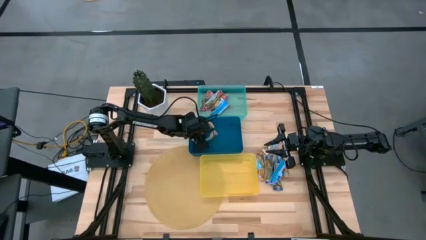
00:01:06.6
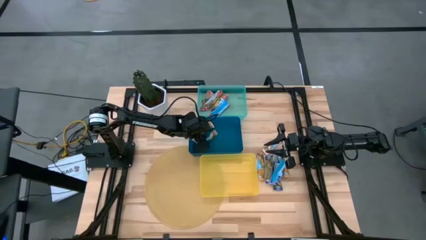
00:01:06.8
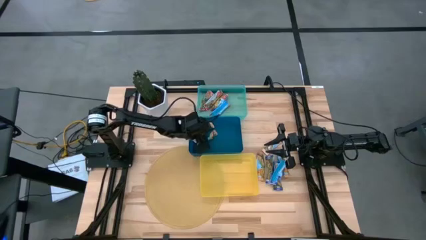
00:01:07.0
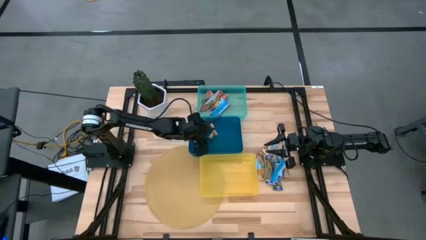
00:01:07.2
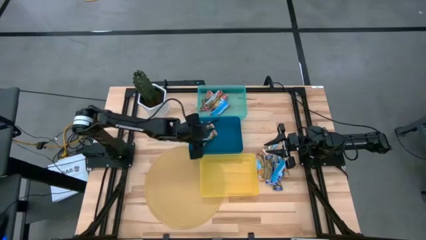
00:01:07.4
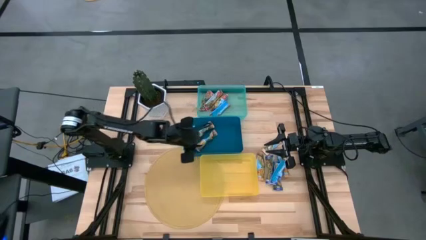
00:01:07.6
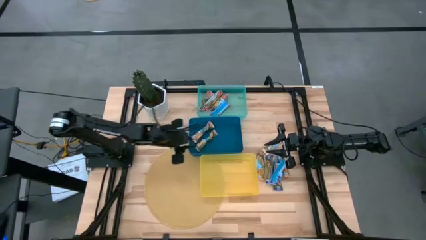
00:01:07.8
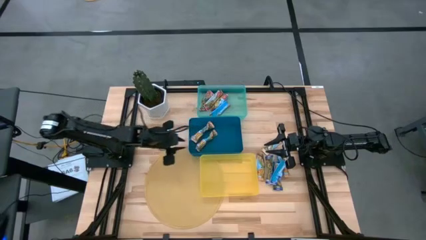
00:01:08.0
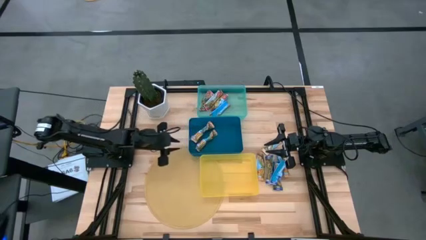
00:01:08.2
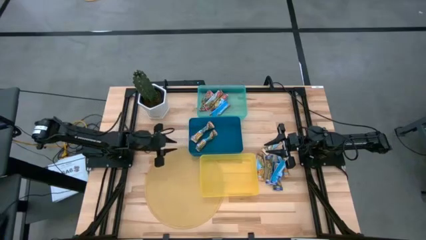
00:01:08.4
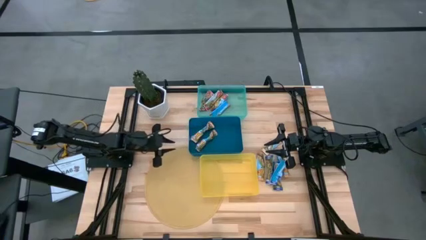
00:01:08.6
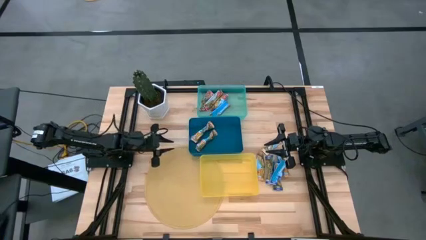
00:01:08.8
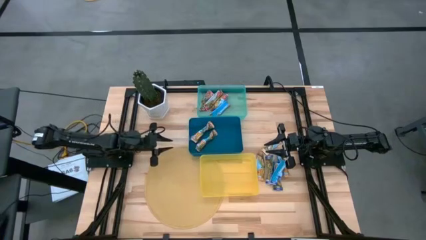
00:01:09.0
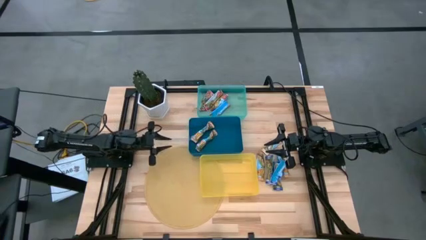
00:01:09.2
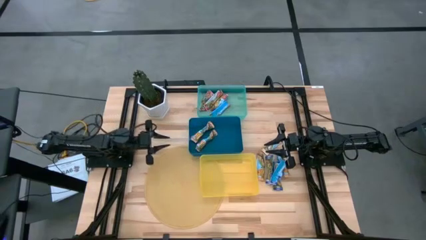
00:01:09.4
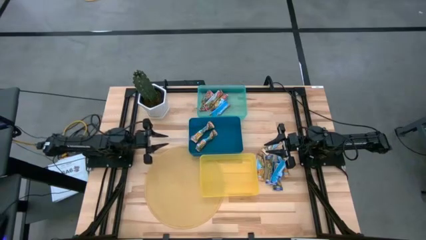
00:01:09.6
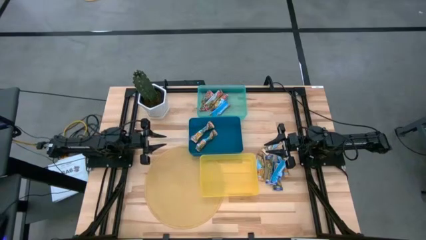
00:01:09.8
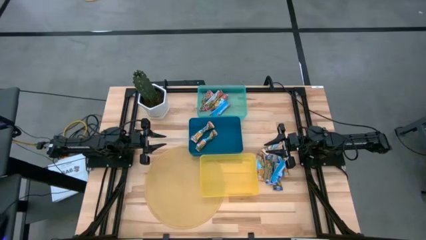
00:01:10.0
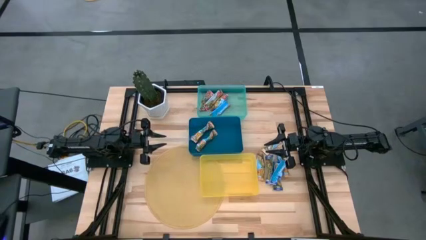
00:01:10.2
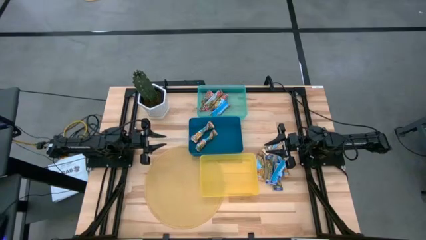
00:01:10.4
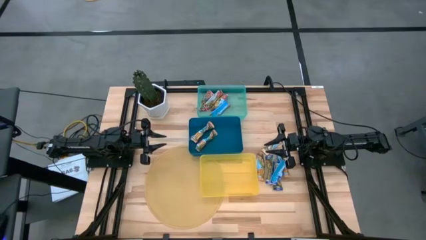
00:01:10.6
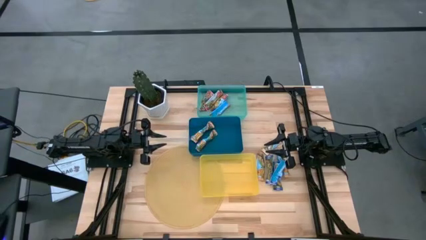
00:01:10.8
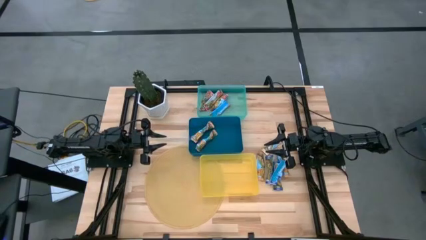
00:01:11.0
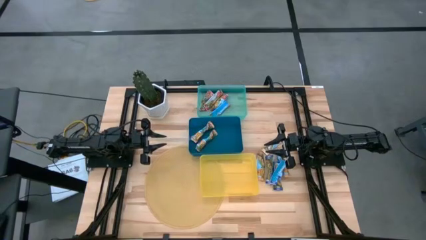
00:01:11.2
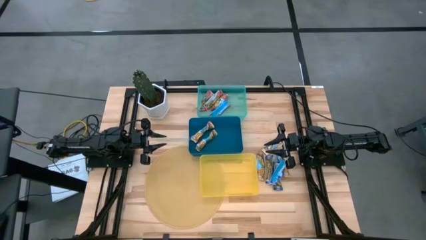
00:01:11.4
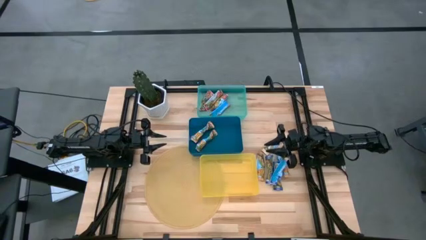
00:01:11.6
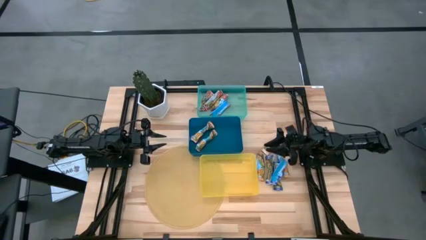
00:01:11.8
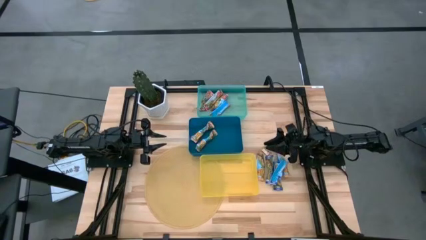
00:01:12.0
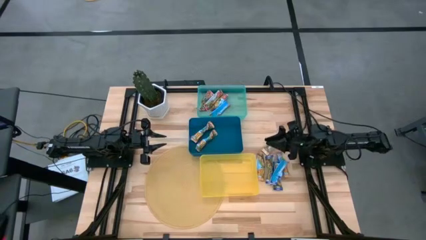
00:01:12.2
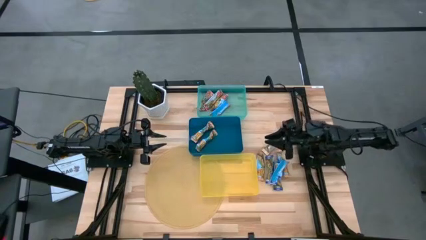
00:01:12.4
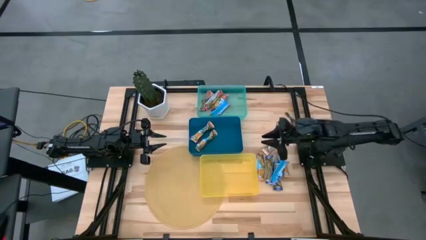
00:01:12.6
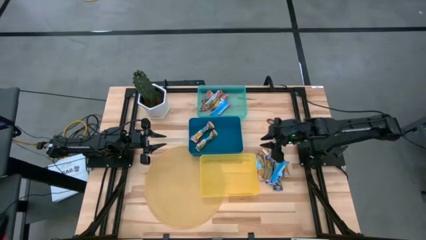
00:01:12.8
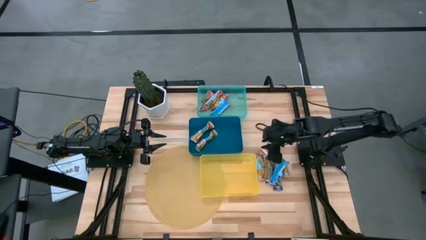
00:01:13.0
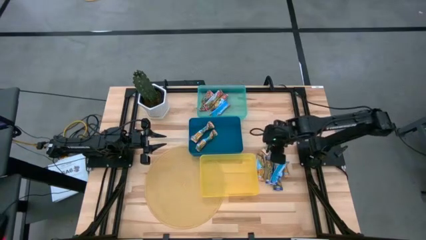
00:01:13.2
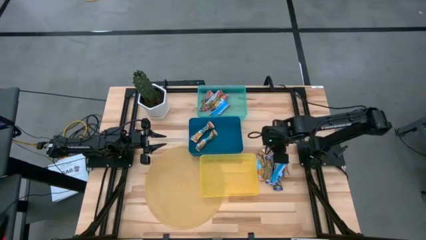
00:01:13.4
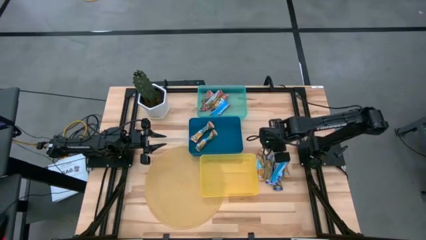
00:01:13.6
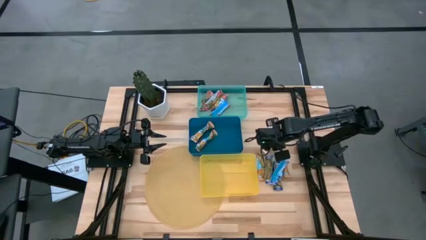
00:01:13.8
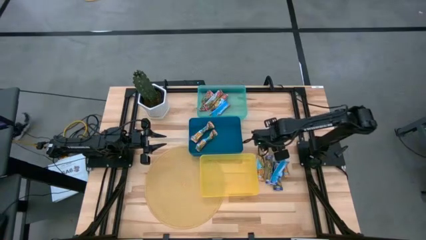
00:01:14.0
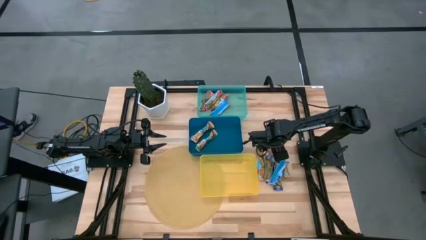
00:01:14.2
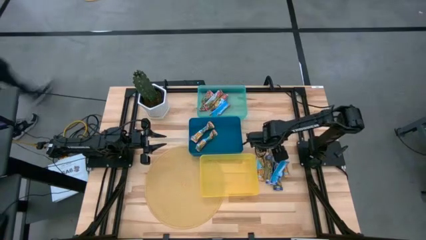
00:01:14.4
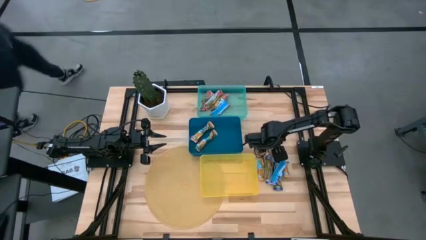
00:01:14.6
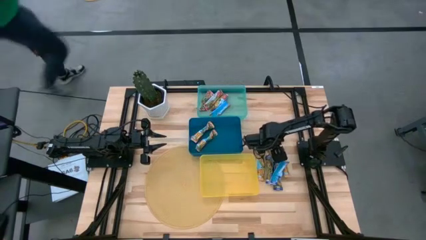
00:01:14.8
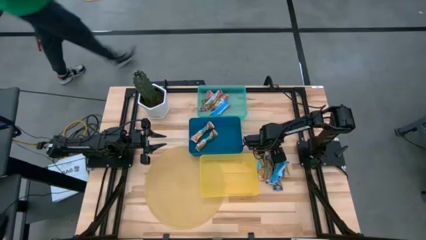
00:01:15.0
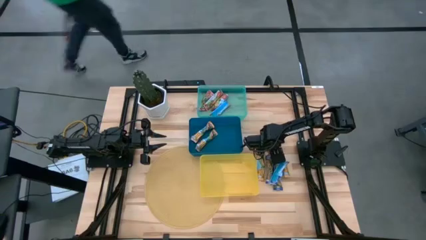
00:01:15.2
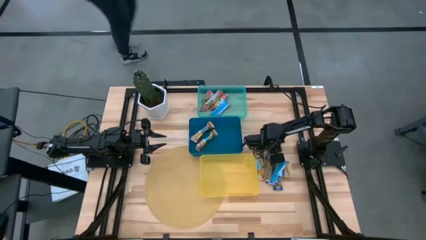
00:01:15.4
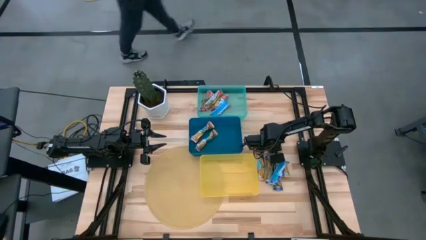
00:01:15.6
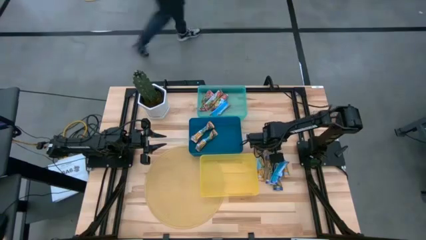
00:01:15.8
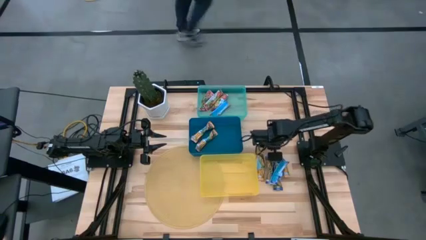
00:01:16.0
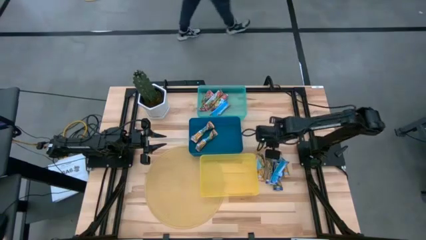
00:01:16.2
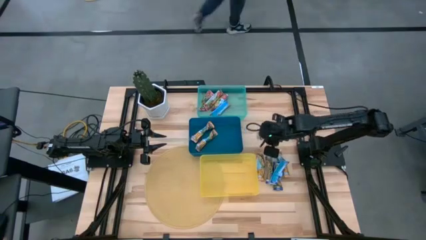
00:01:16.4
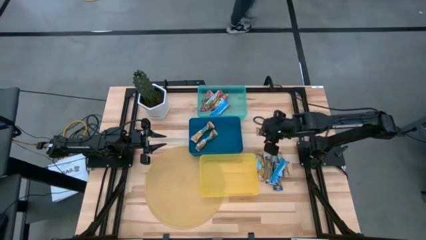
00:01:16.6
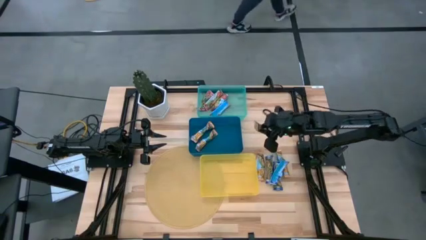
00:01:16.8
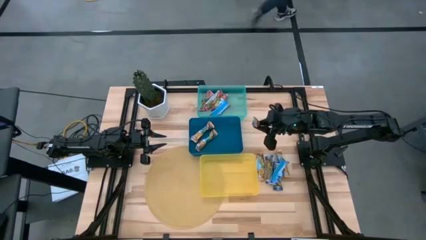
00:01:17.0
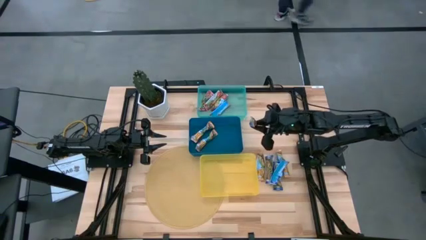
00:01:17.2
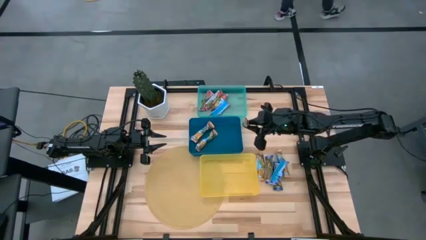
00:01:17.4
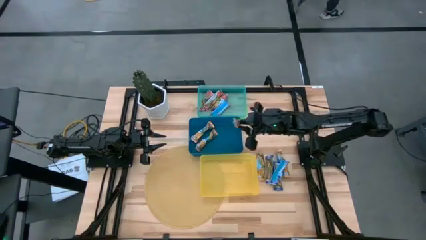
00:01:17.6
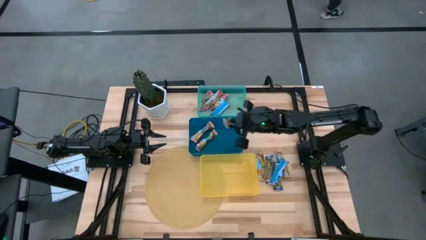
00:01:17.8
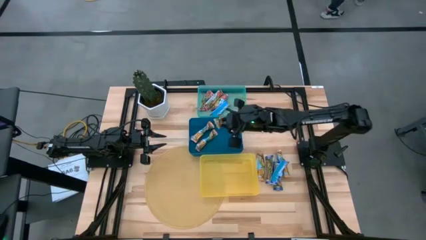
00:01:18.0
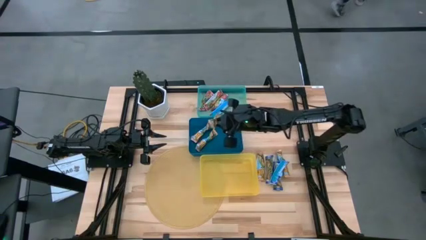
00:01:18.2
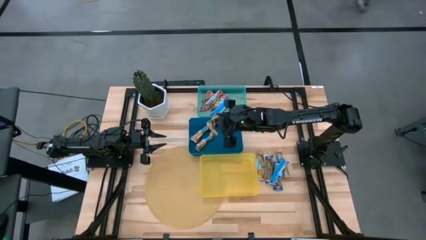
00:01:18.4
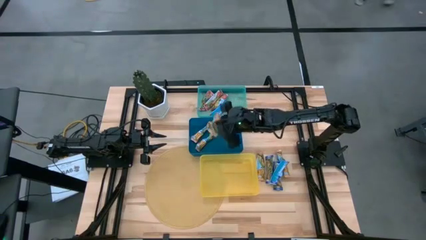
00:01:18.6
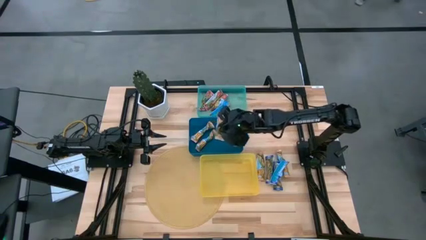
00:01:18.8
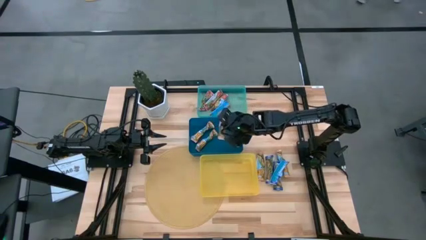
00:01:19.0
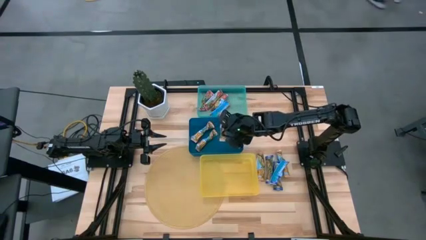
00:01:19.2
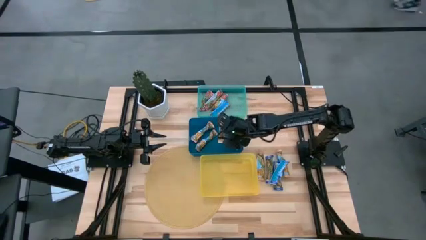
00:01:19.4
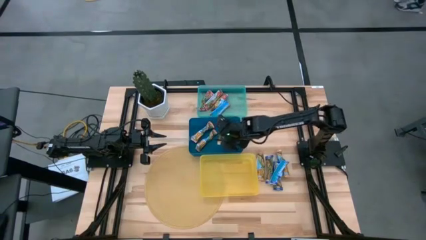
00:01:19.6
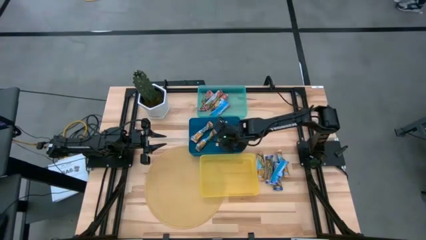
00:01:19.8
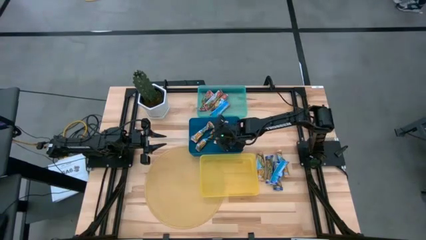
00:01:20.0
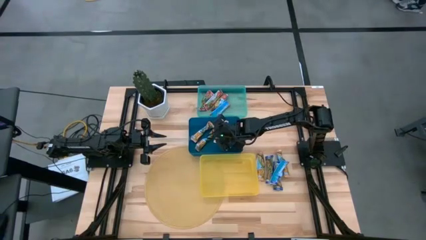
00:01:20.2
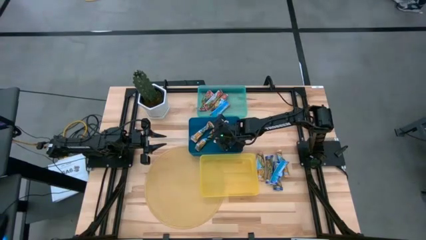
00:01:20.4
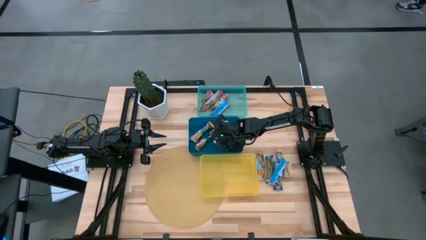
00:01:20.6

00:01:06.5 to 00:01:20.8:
Task: Pick and place Granola Bars by type
Put the yellow granola bar into the blue bin

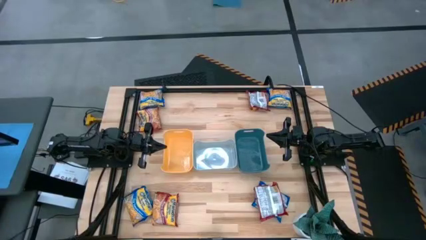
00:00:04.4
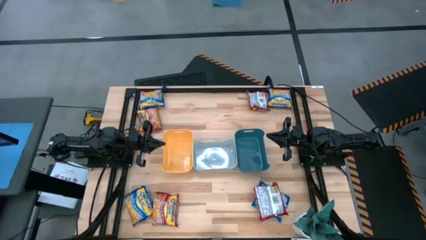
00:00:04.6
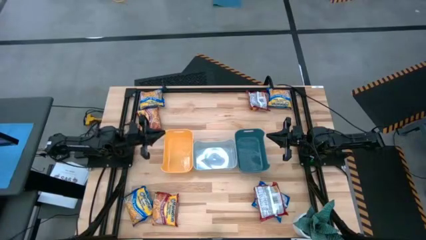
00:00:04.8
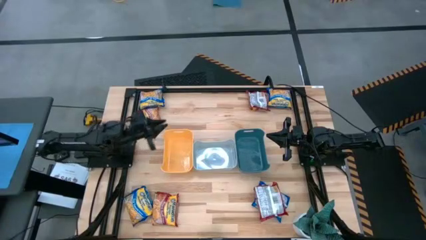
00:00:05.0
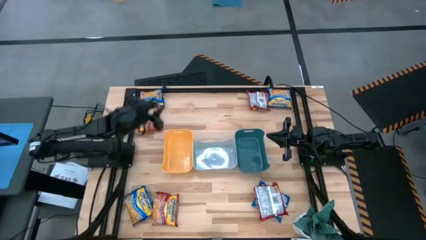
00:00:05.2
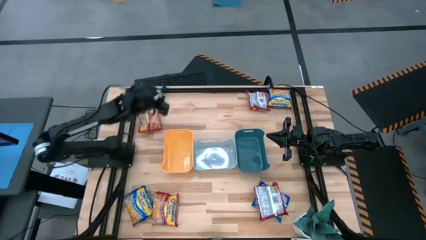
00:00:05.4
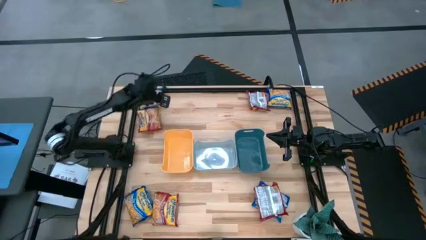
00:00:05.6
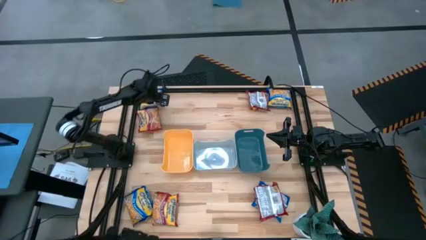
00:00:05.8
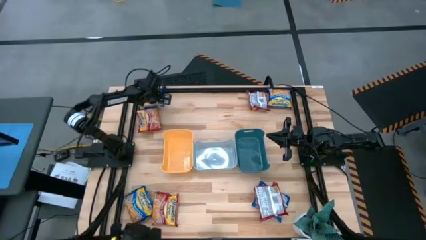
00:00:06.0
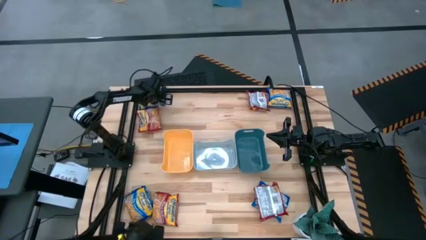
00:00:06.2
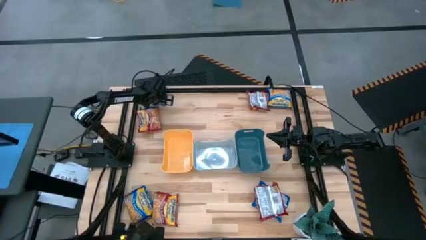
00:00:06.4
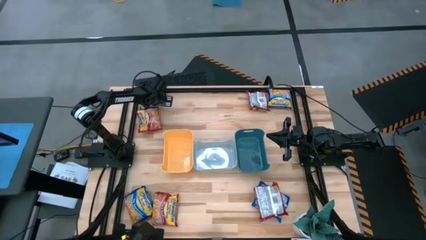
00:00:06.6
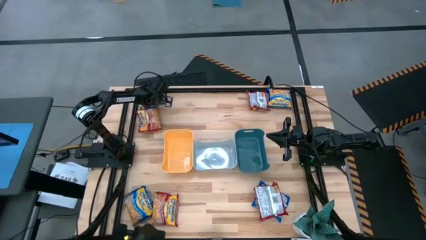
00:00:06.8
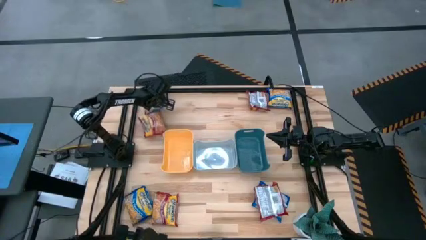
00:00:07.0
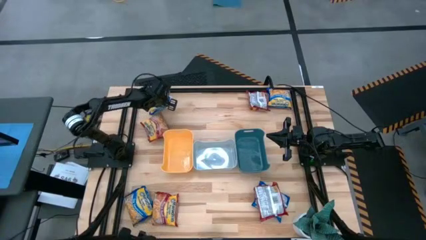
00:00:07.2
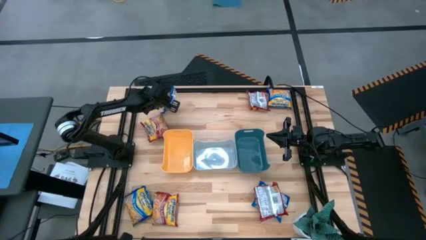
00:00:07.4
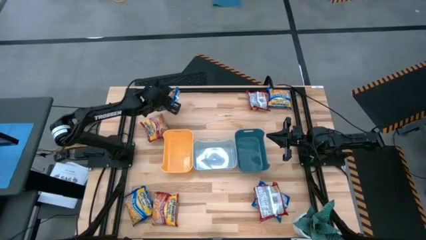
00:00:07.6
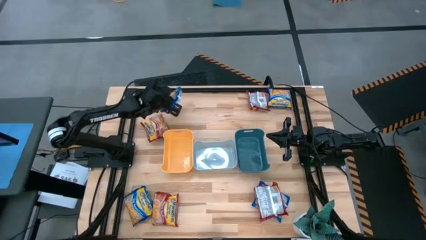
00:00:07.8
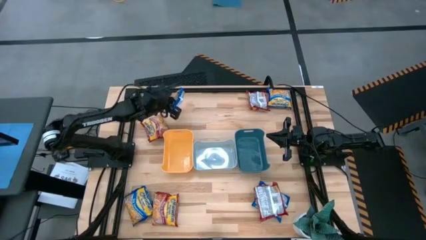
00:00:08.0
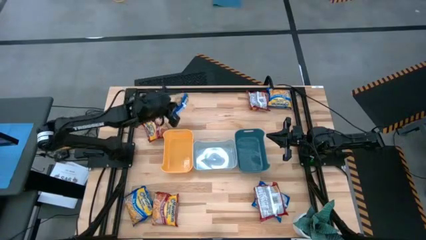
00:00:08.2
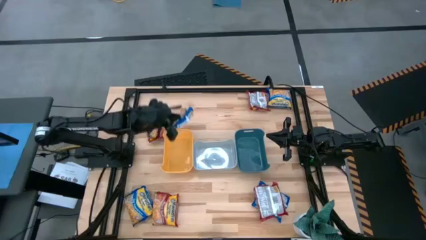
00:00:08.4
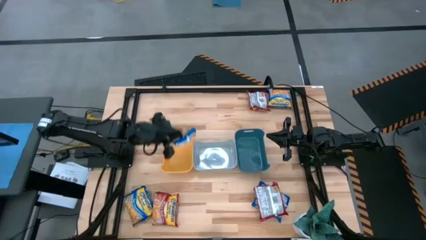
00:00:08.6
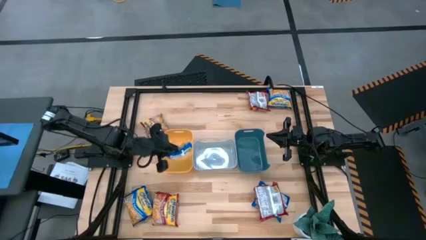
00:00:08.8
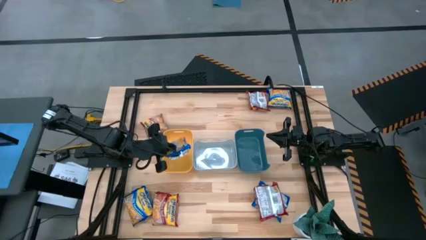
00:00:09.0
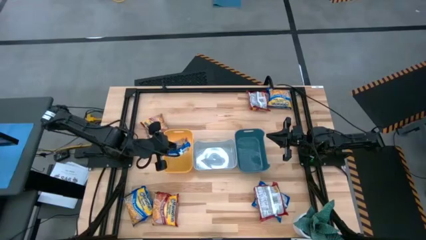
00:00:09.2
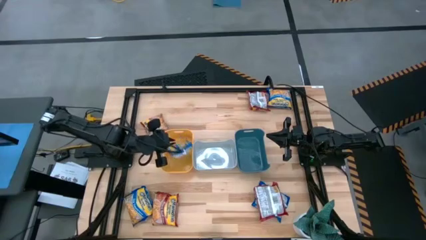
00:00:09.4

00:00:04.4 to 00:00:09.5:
Task: Sort Maruchan noodles
Put the top left blue noodle pack into the yellow bin
